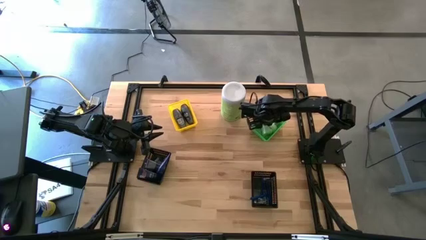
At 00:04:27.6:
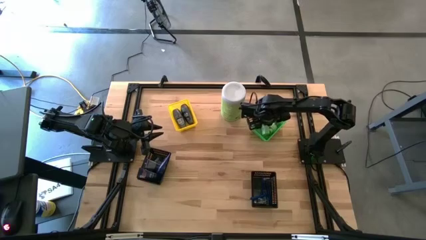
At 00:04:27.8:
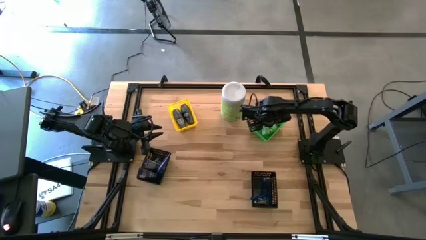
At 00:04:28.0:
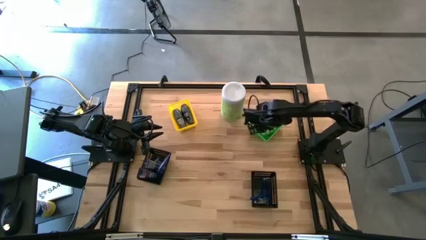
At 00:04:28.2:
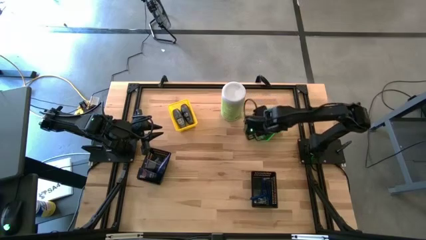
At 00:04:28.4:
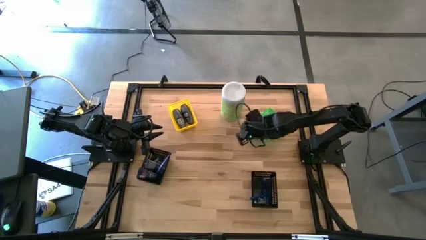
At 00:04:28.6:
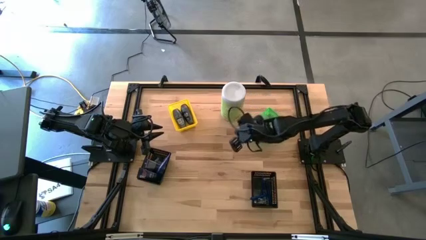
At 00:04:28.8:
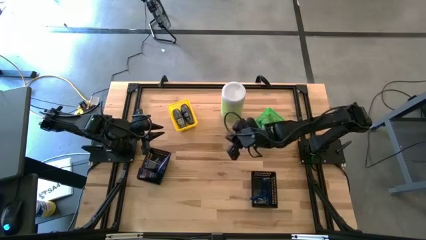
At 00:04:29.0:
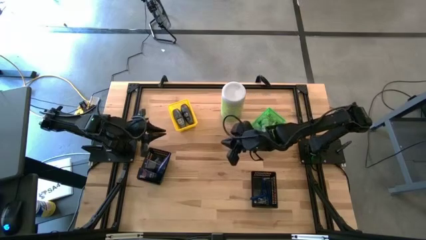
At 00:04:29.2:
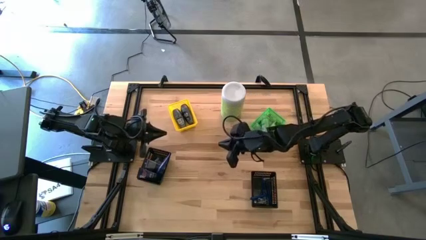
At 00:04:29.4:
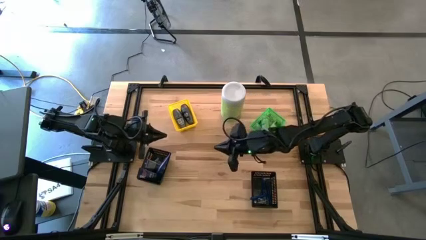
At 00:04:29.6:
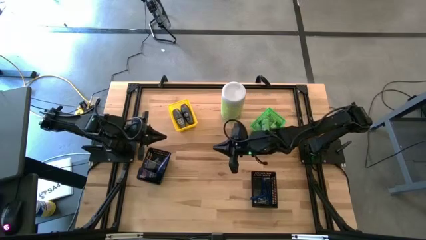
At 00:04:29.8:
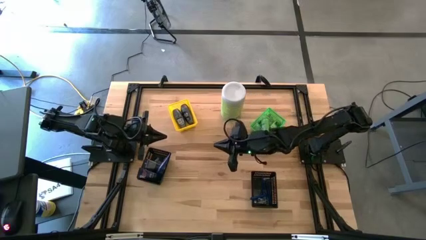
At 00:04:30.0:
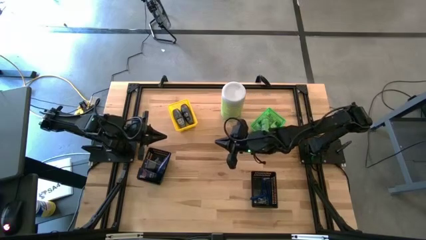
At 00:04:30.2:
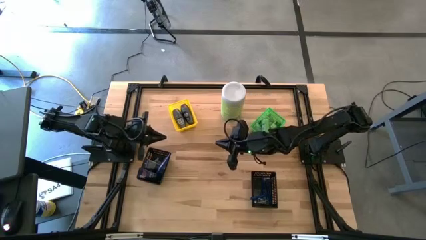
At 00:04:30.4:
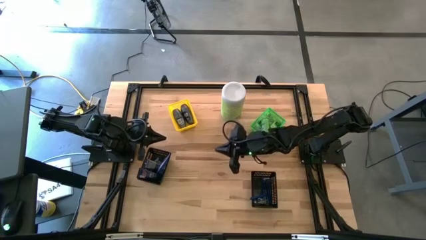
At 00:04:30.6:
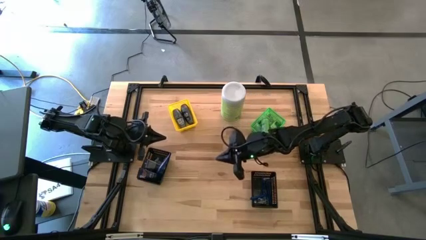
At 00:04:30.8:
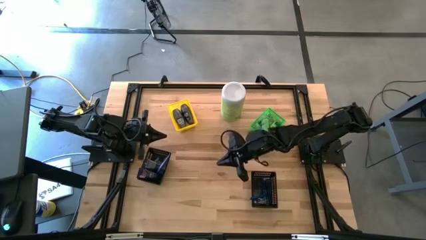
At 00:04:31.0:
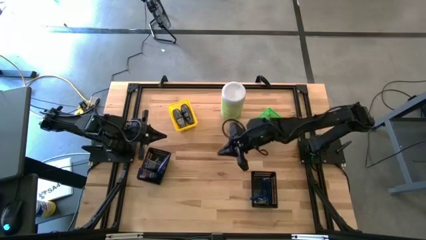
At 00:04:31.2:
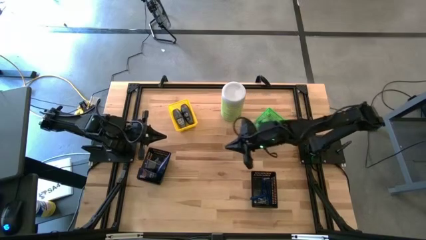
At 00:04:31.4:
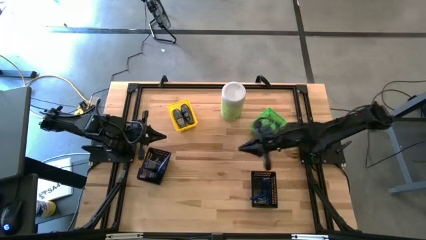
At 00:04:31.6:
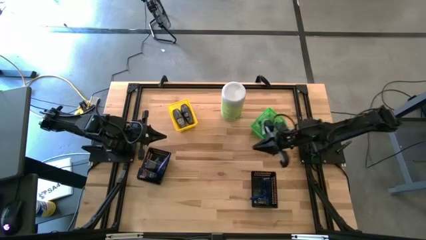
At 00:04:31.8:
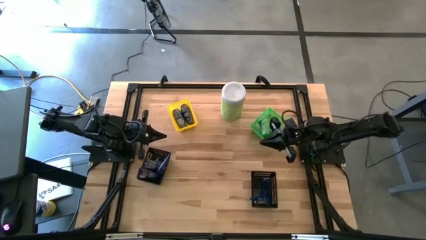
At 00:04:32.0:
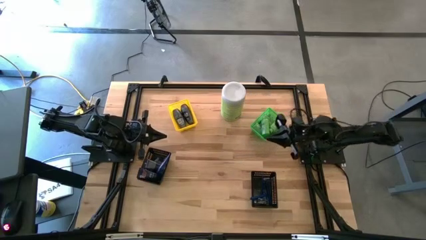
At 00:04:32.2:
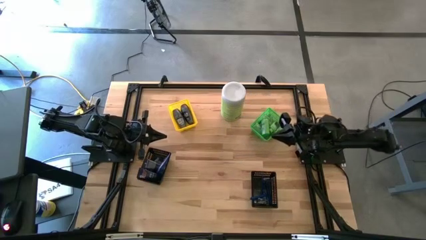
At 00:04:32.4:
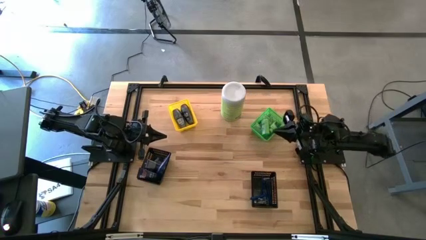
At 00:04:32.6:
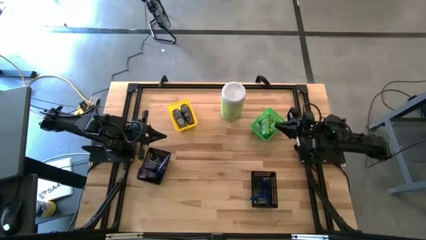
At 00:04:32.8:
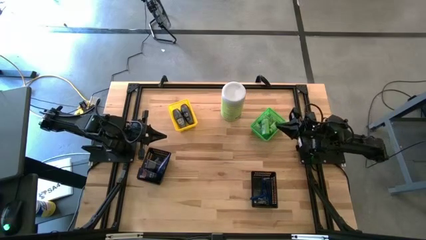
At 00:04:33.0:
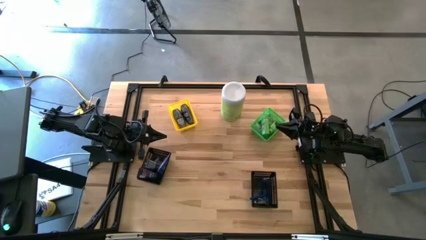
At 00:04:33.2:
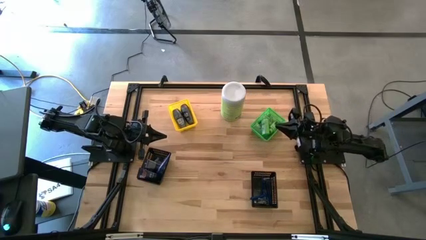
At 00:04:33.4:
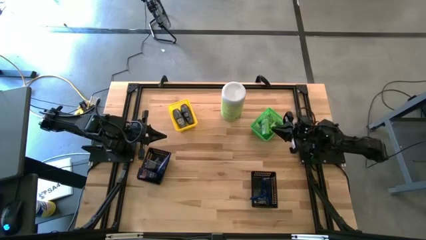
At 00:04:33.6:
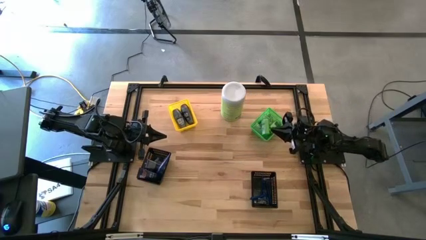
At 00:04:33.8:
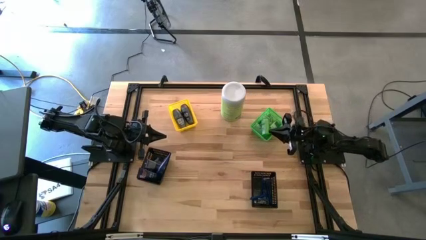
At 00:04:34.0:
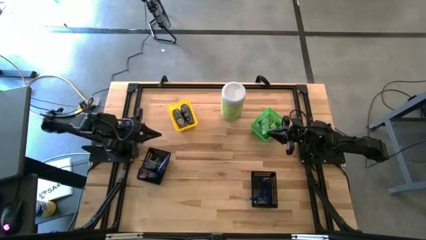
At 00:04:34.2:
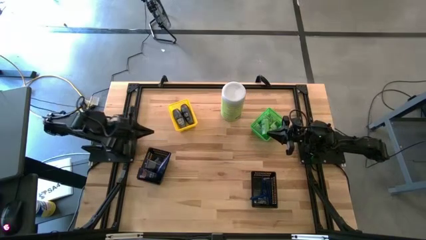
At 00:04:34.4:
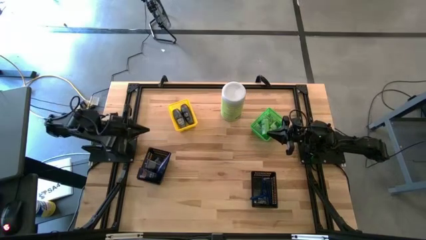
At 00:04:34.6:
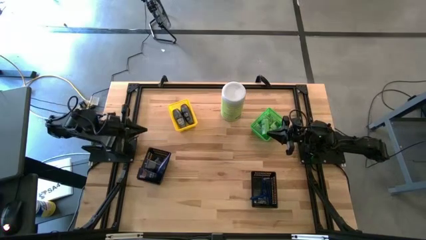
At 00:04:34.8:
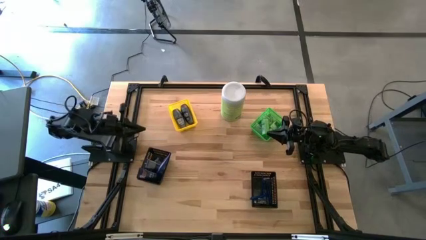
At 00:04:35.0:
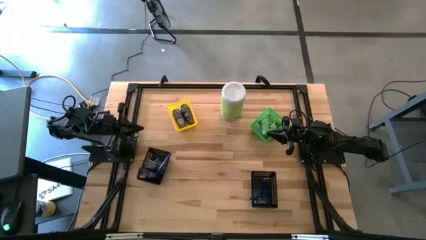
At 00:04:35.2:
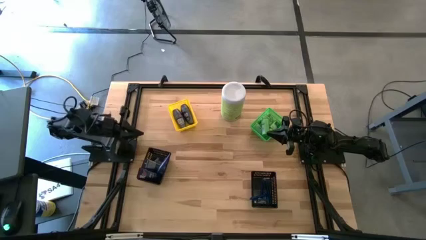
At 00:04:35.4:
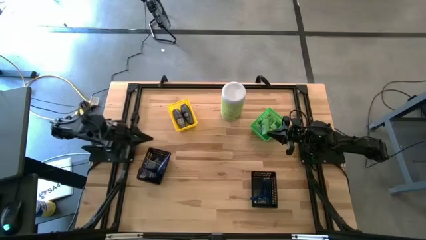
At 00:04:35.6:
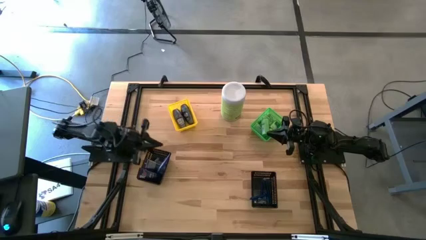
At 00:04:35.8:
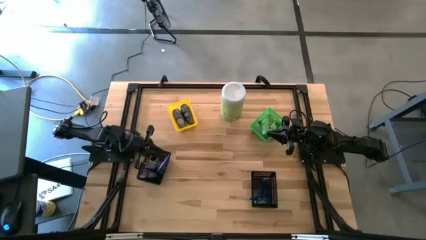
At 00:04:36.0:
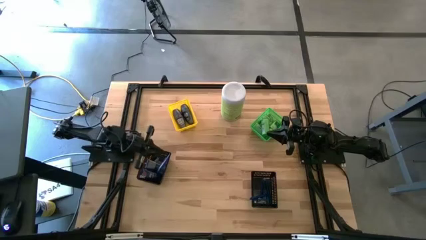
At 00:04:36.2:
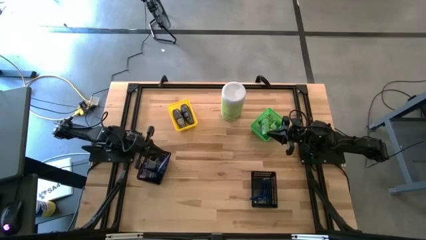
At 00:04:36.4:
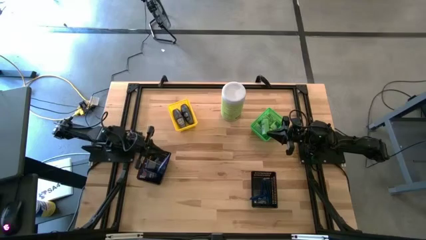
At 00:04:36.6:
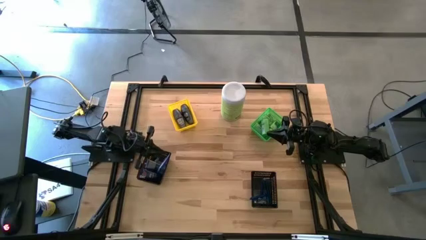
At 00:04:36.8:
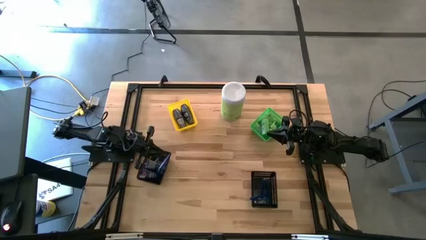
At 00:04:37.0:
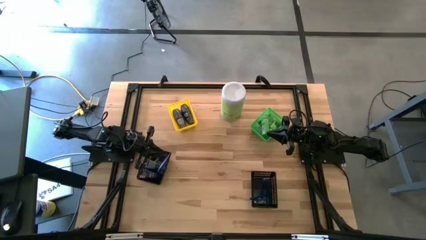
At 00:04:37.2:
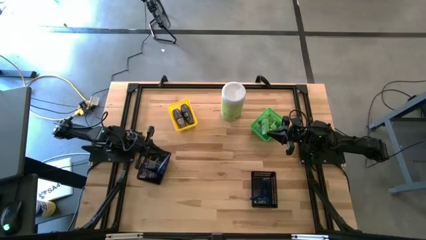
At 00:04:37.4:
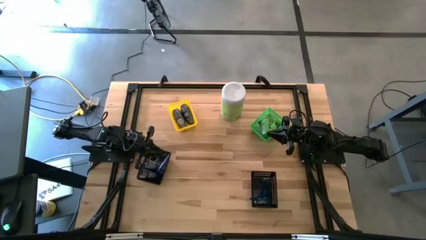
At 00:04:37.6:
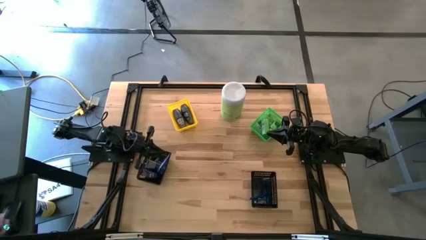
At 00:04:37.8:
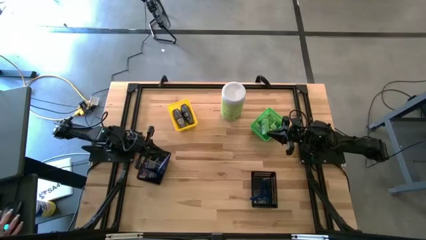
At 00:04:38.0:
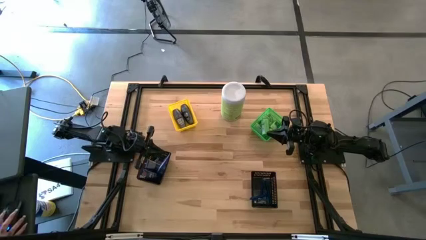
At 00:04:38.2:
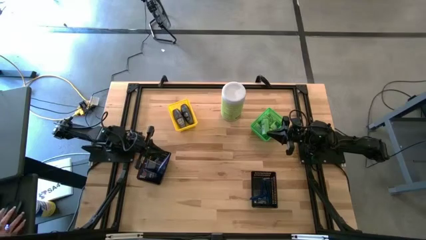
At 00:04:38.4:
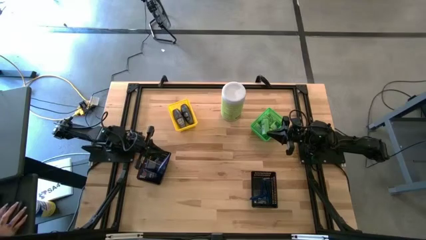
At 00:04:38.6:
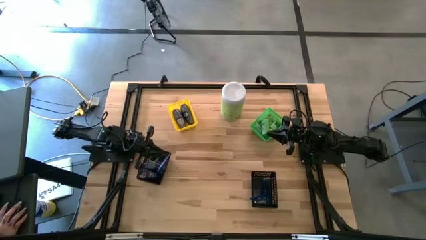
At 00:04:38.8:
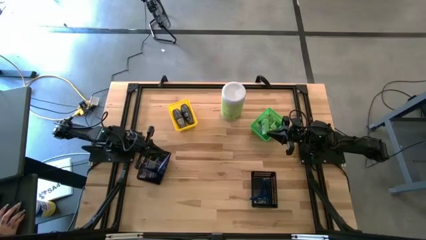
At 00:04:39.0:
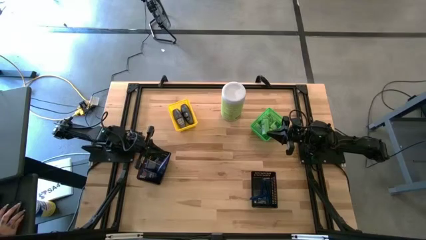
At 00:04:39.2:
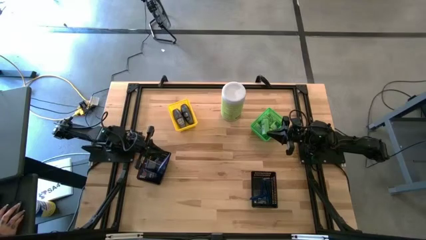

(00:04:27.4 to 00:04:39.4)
Task: Pick & Place Travel size toiletries
Return to home position

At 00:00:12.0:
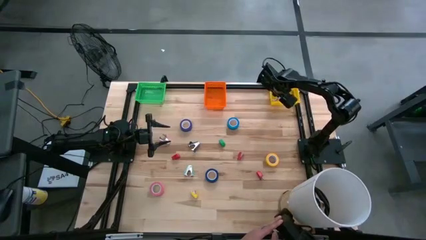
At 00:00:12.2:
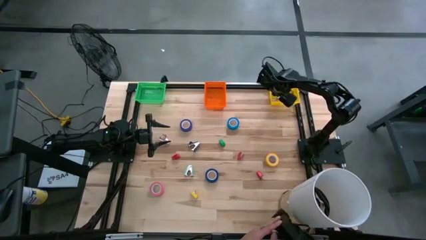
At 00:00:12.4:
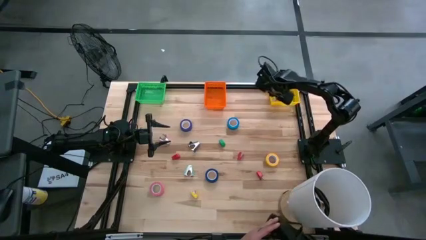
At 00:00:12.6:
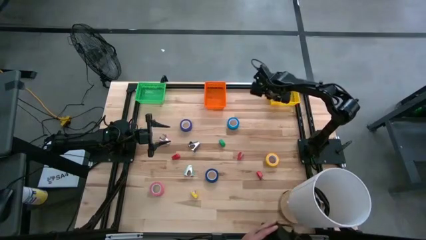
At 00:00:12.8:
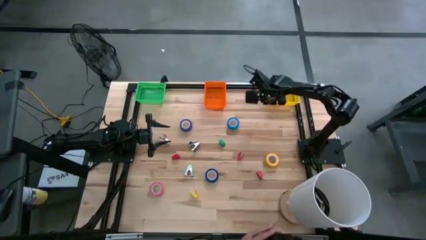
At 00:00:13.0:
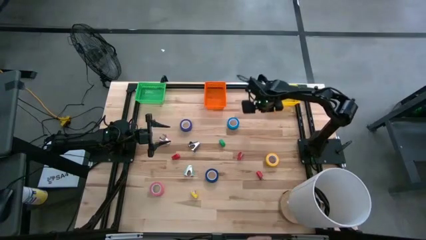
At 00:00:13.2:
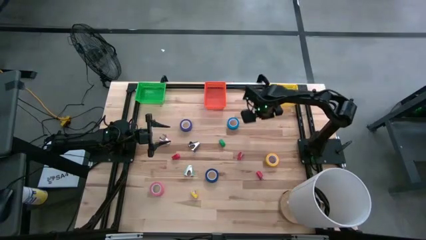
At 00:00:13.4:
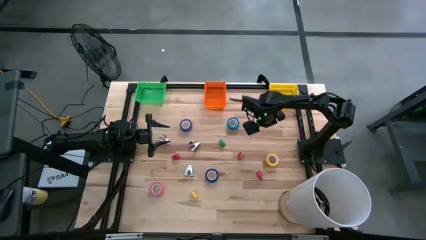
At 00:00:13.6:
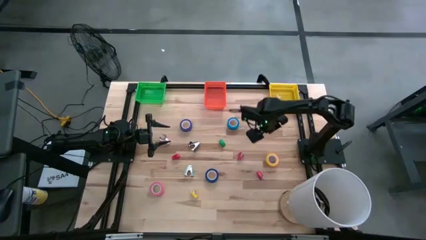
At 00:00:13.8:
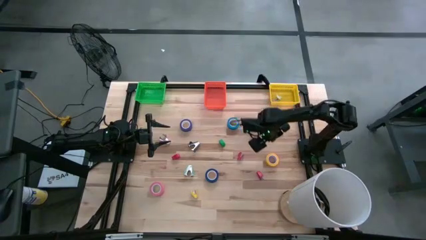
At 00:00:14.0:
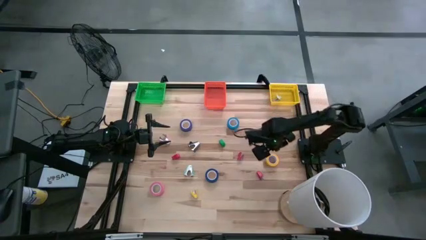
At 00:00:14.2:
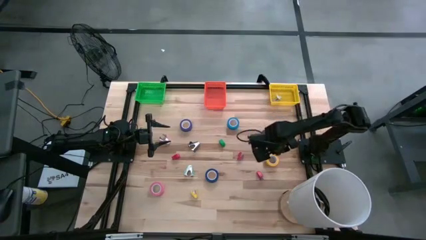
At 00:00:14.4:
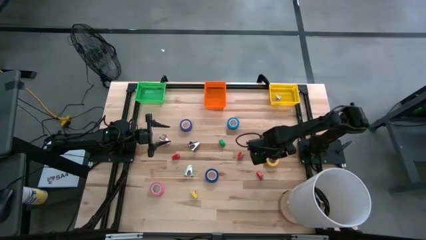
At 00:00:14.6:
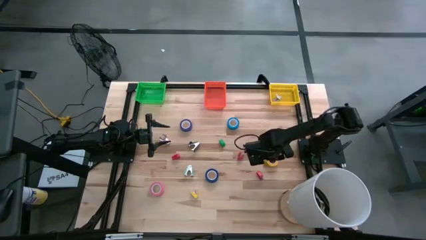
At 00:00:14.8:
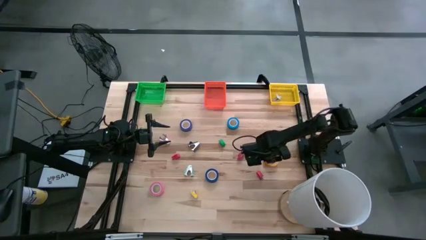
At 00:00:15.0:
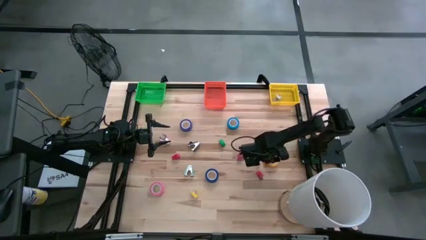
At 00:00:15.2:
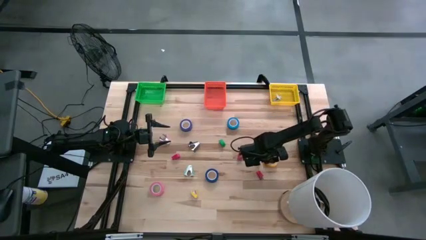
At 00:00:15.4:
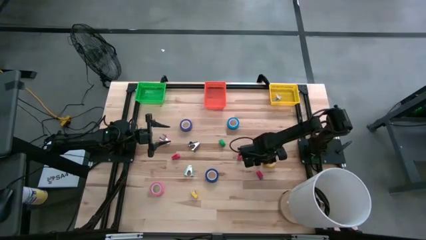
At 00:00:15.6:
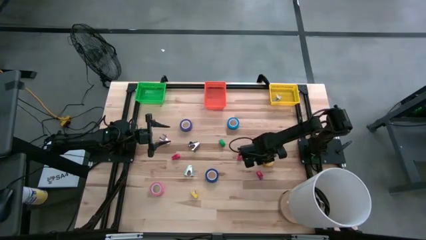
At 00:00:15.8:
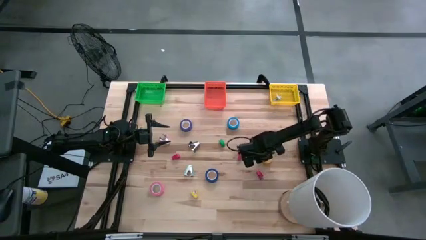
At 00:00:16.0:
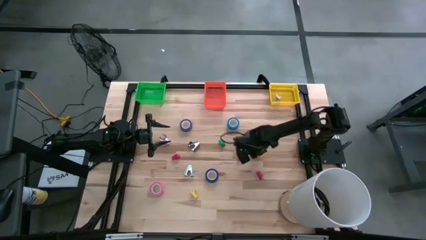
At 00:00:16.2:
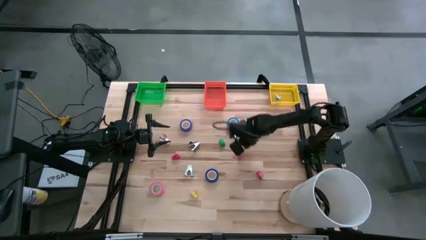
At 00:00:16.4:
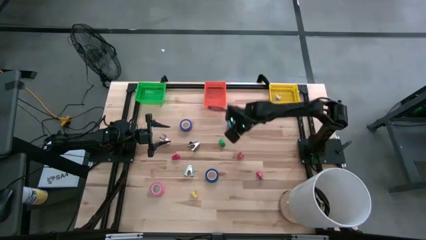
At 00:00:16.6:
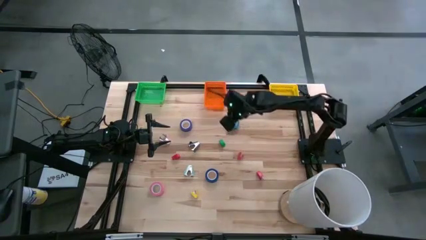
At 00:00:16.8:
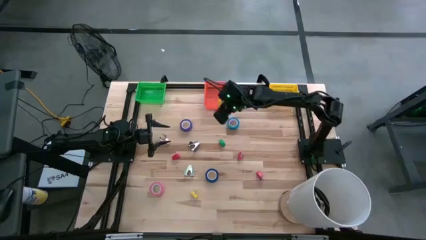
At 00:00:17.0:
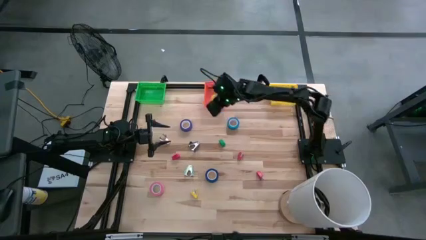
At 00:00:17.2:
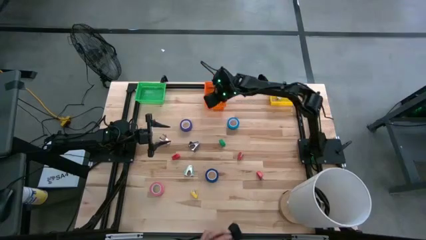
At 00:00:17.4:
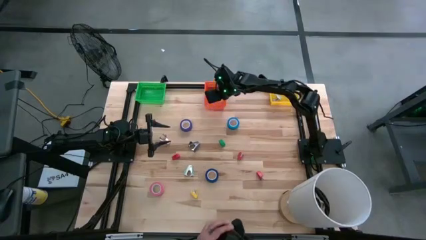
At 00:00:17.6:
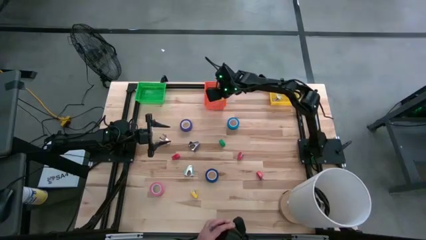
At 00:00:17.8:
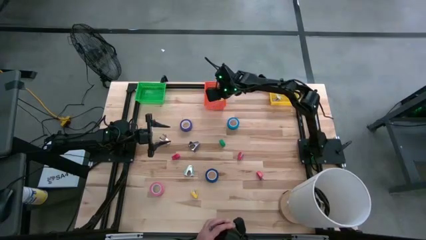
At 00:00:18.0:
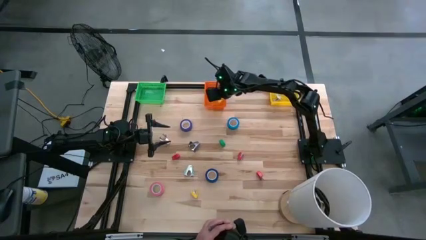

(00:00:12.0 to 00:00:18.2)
Task: Pick and place Stapler, Stapler remover, tape
Put the yellow tape into the orange bin
